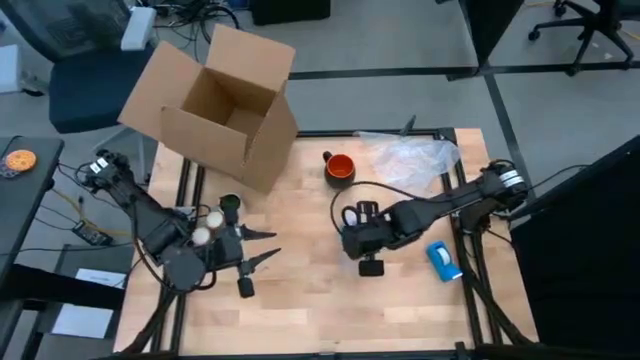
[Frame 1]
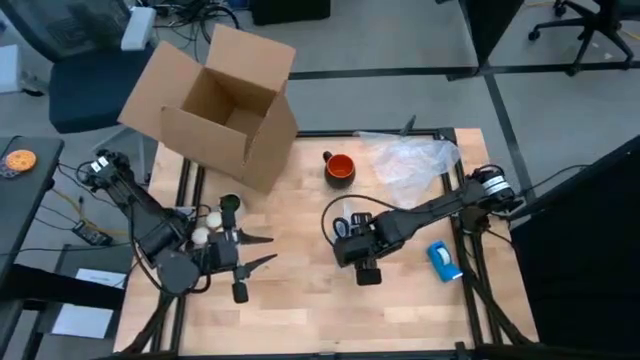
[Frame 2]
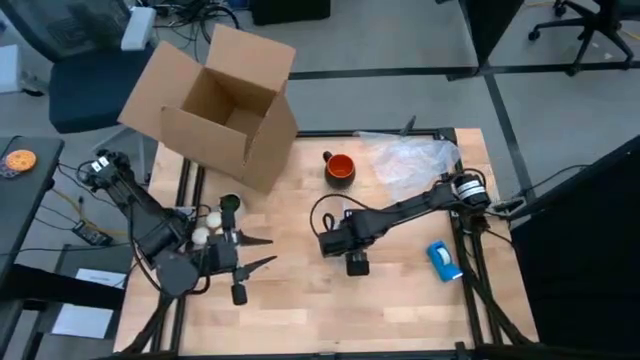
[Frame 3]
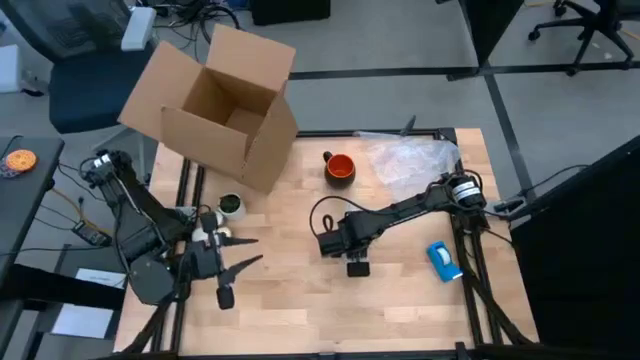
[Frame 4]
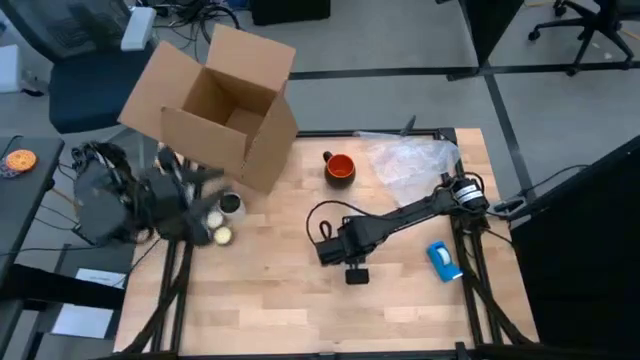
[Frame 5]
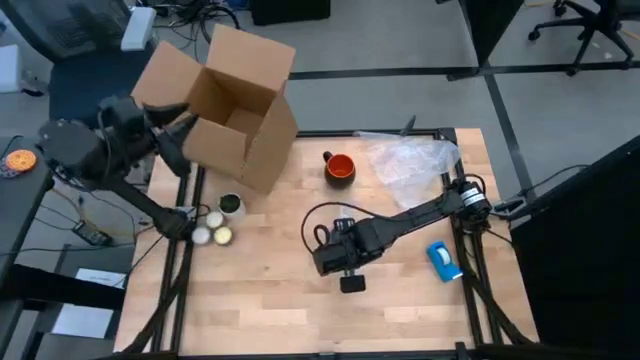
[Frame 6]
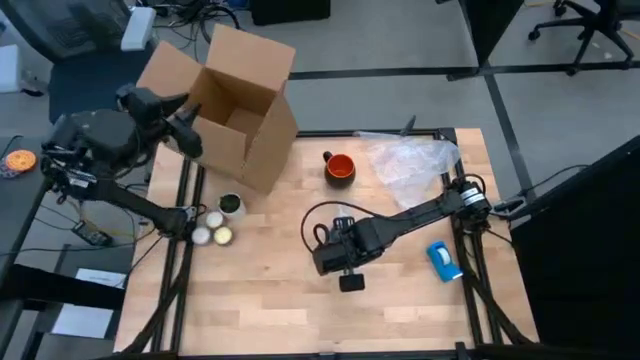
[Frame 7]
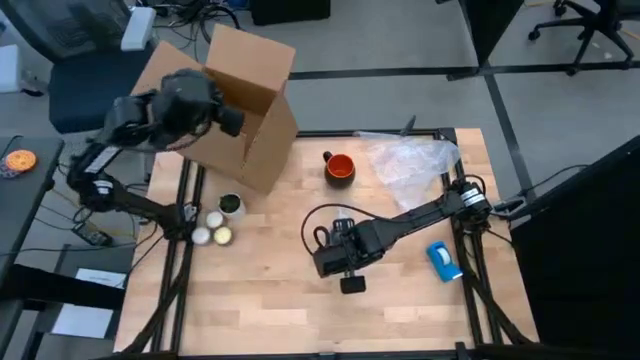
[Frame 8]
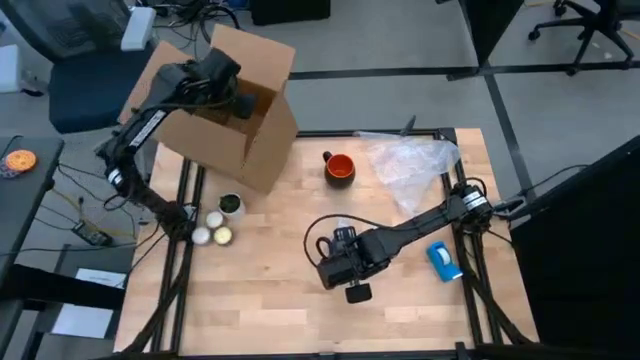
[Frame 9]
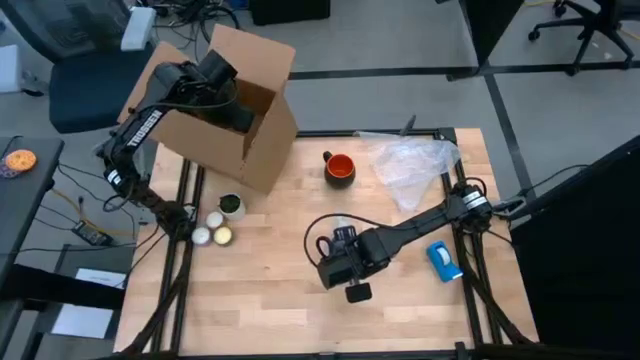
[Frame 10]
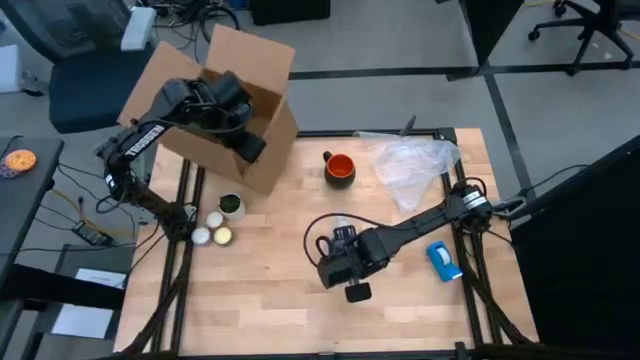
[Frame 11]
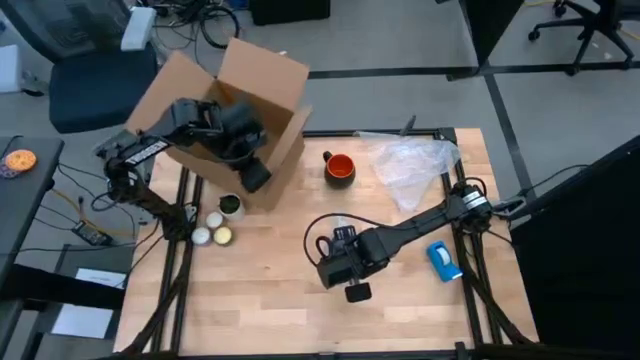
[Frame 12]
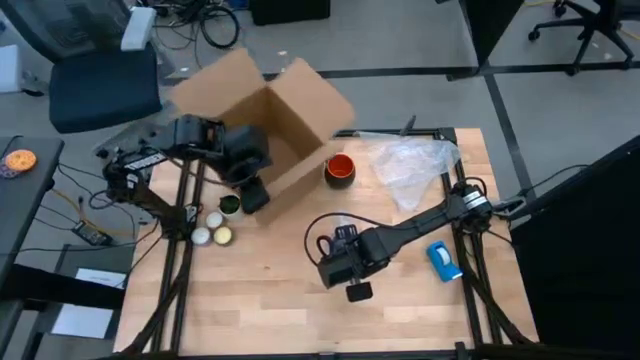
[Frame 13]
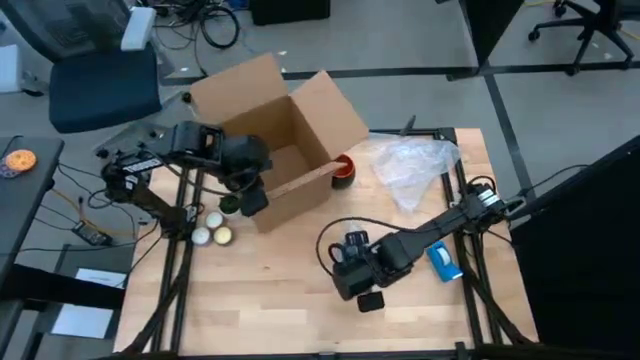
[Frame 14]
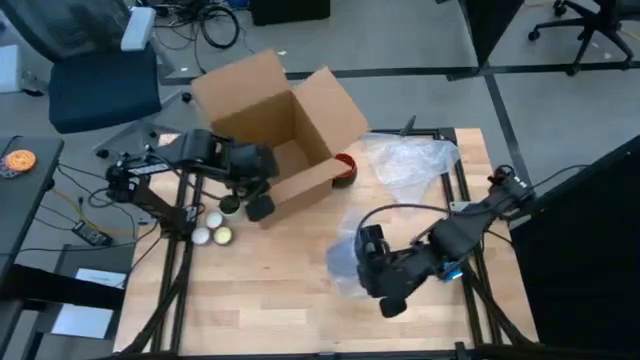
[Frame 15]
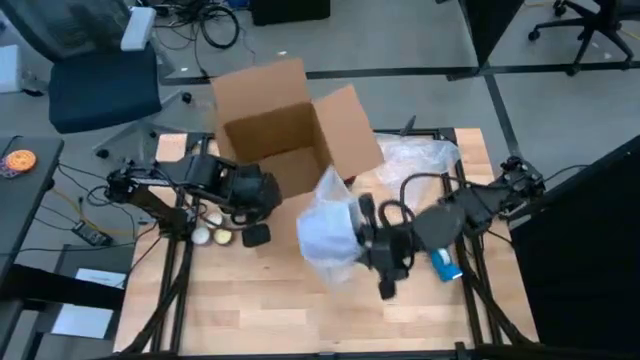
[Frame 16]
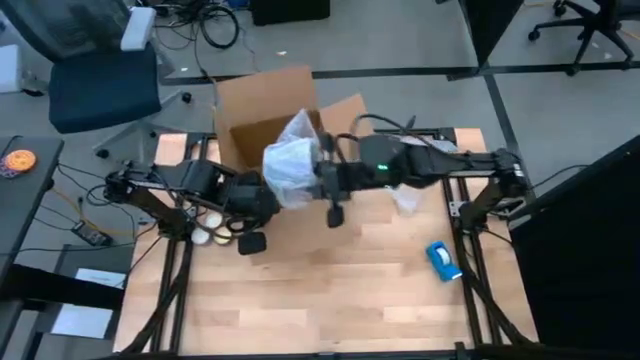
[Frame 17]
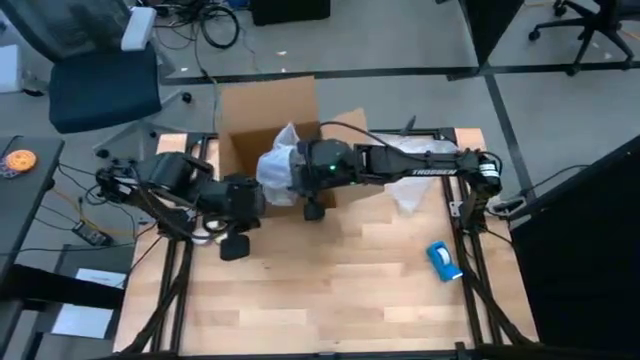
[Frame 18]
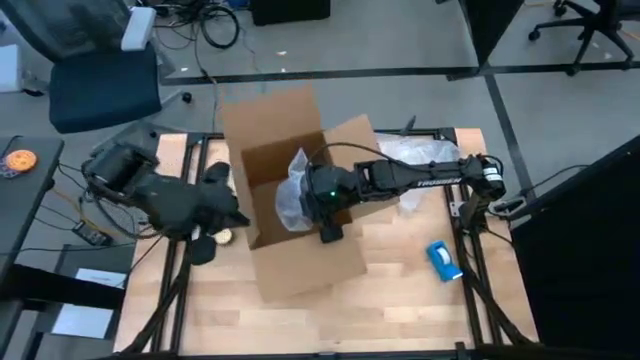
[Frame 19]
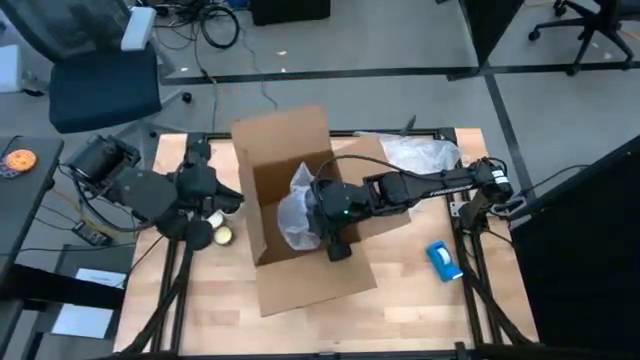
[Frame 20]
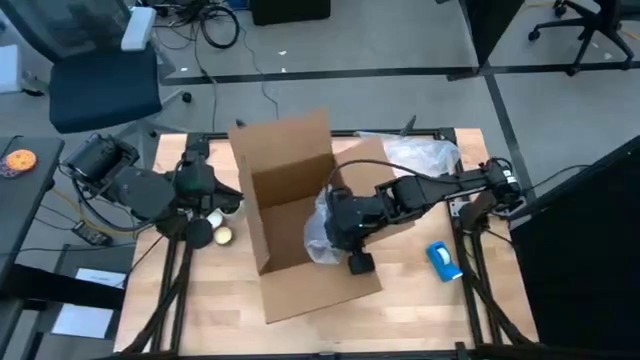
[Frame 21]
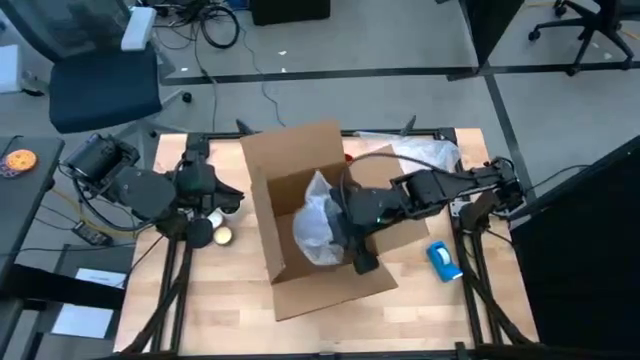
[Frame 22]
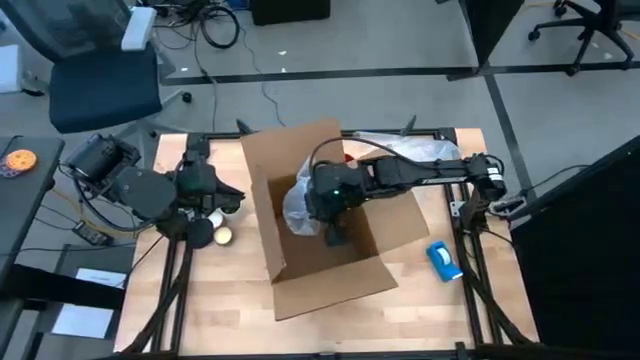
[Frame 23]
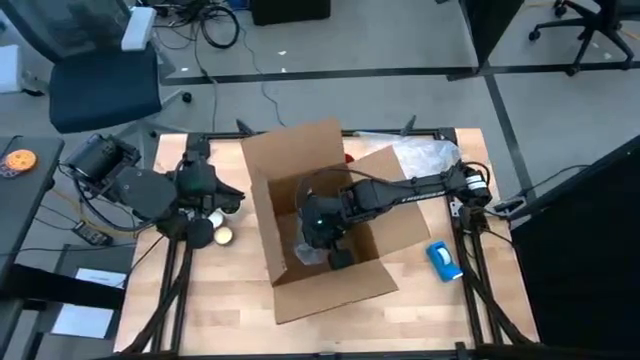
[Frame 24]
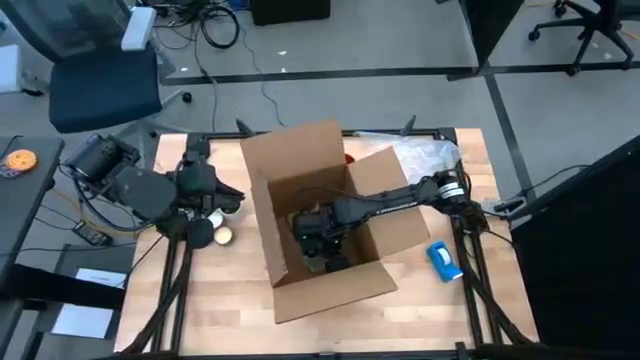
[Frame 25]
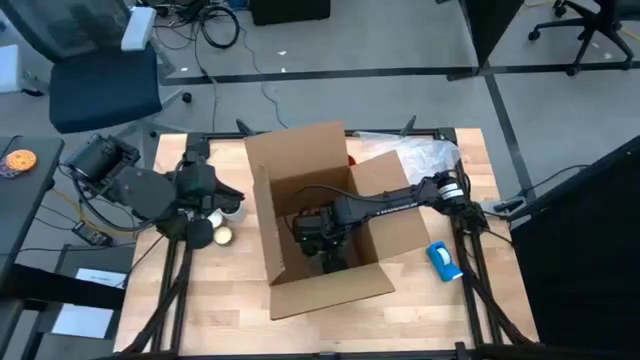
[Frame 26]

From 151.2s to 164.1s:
Task: wrap mug
Put the wrapped blue mug into the box

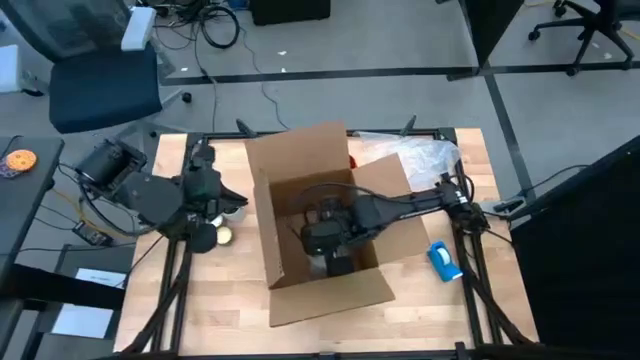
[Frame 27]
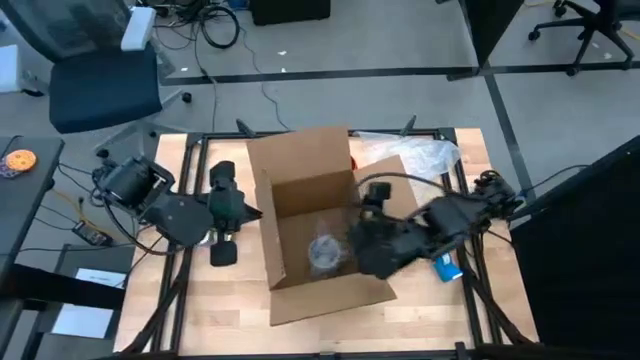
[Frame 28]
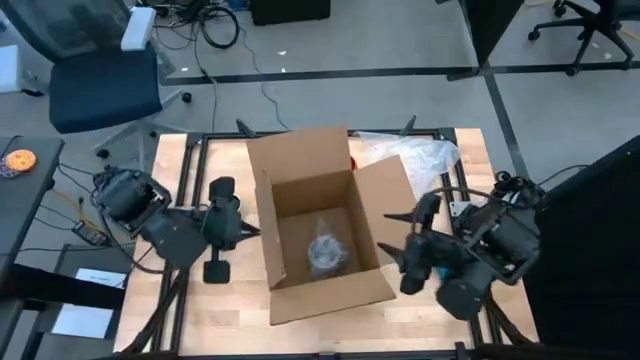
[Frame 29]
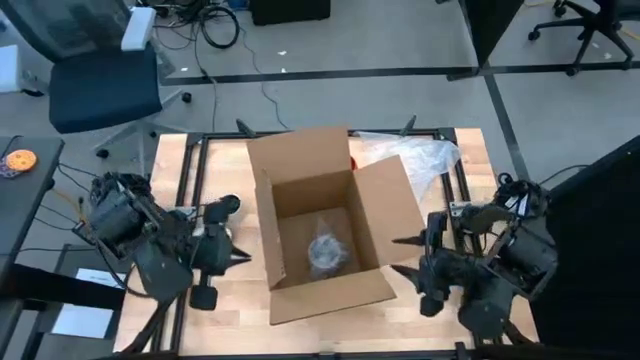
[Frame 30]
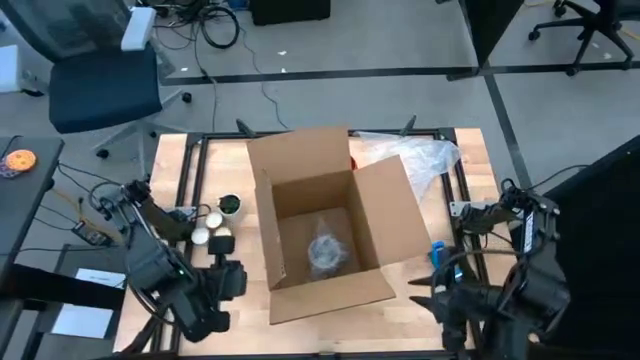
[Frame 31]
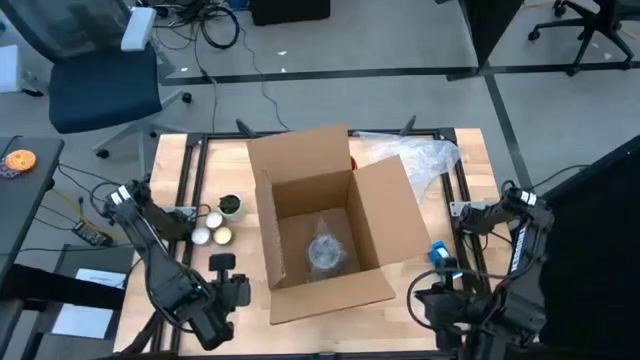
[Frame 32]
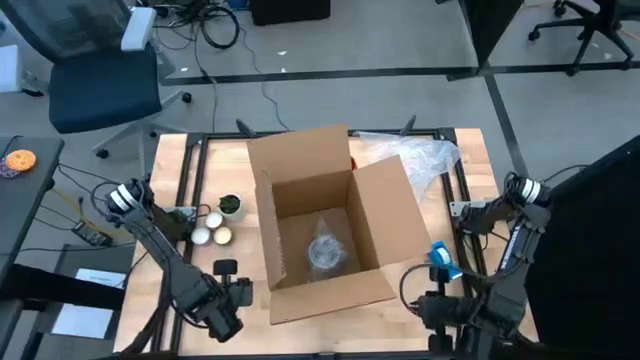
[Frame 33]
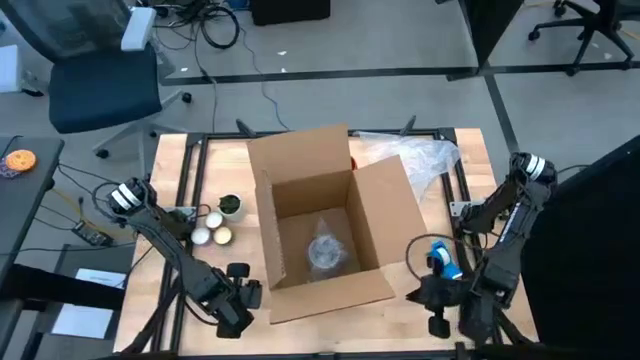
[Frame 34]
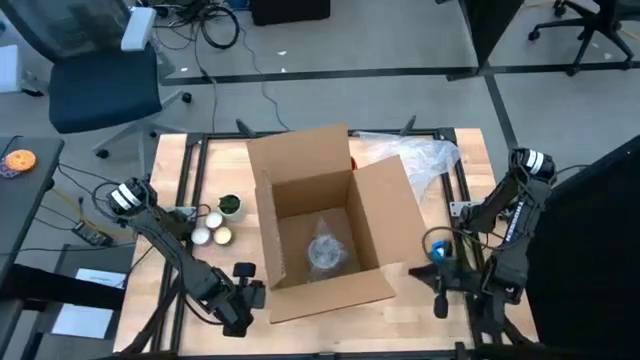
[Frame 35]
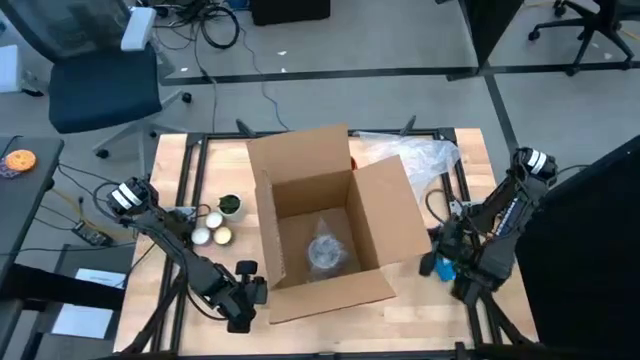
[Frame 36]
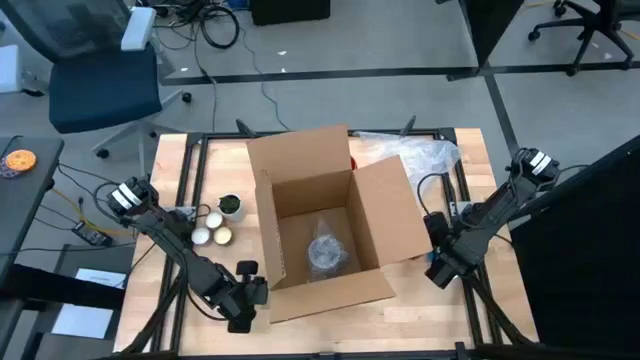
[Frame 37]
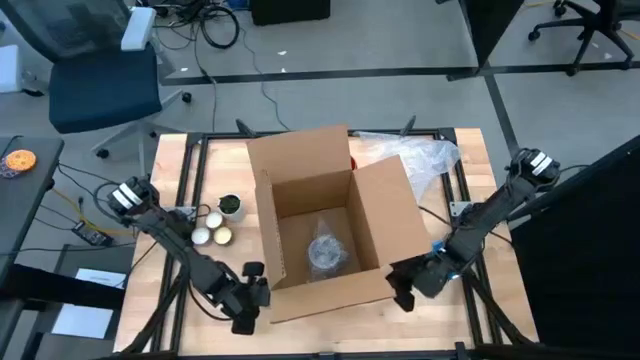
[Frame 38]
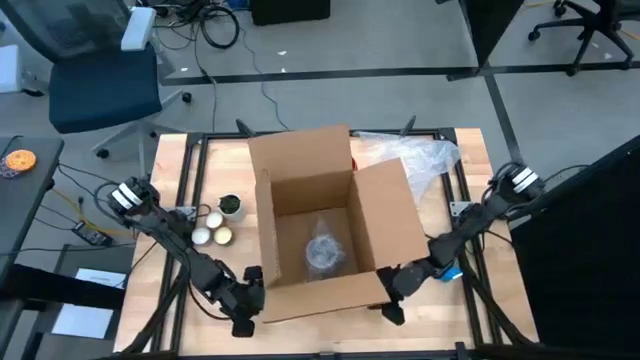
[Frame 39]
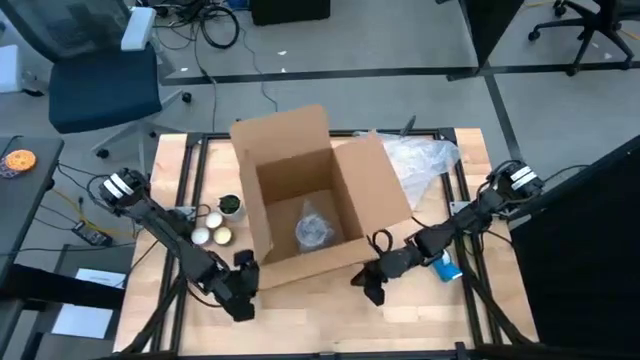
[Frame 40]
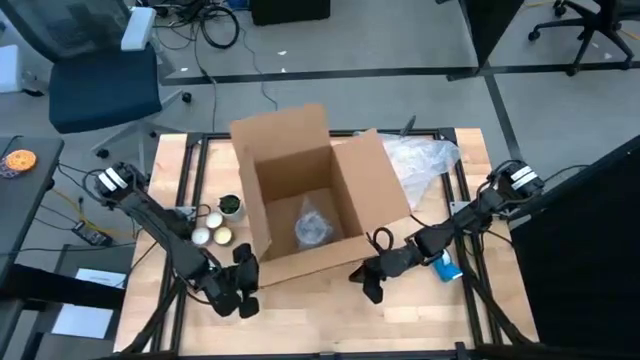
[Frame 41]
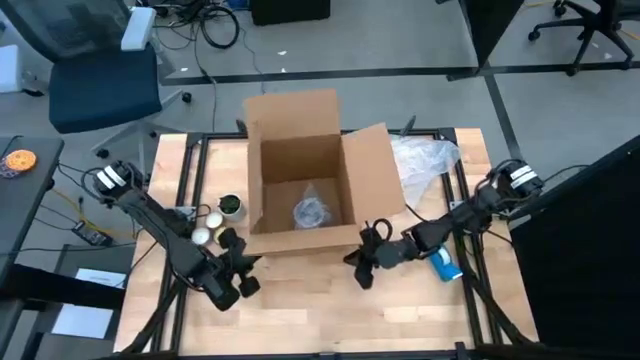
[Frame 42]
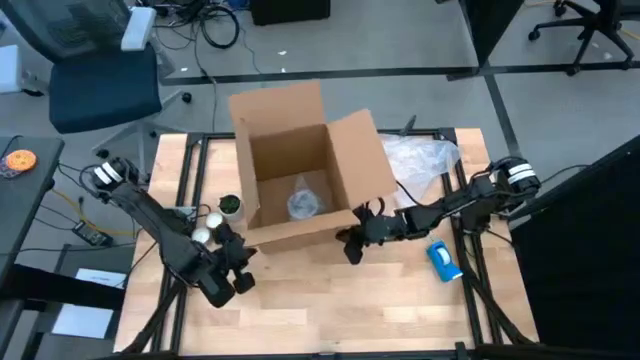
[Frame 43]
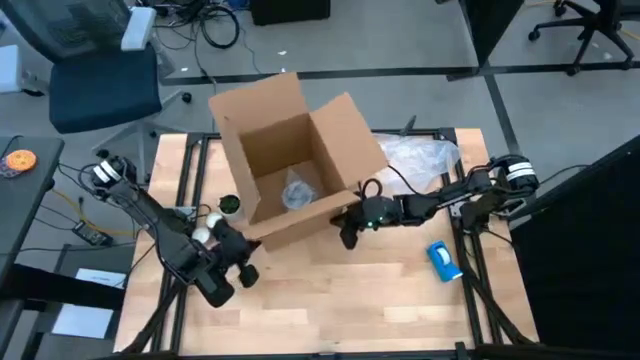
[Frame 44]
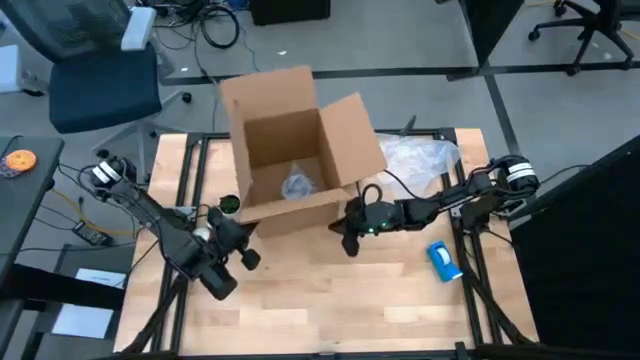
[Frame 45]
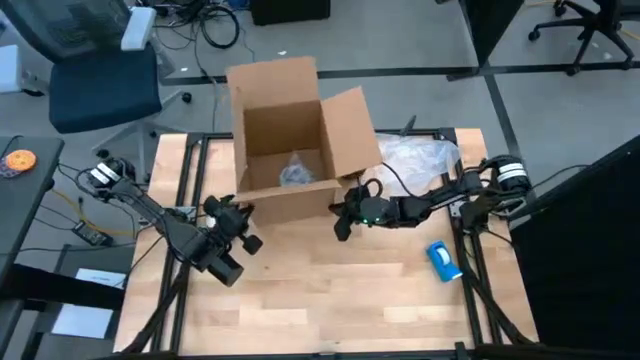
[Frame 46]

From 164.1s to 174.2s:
Move the box on the top left of the table
